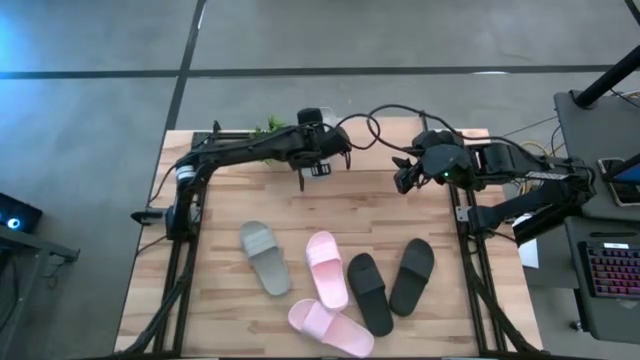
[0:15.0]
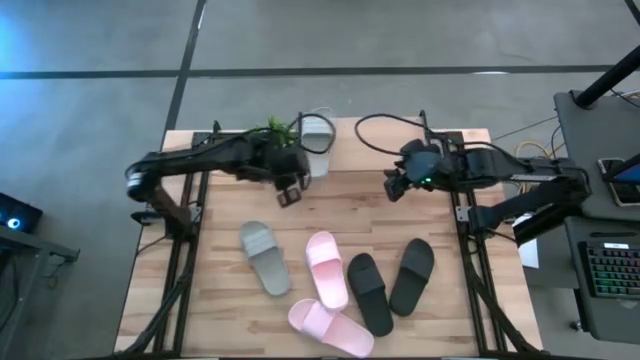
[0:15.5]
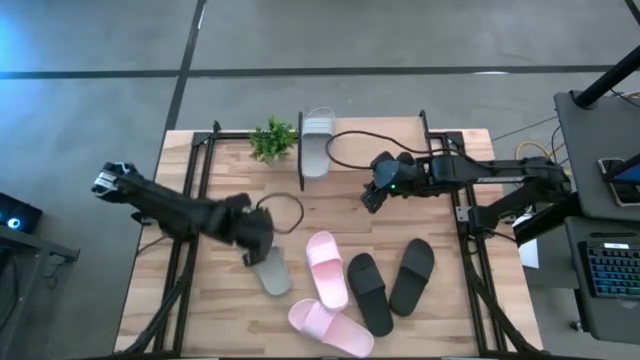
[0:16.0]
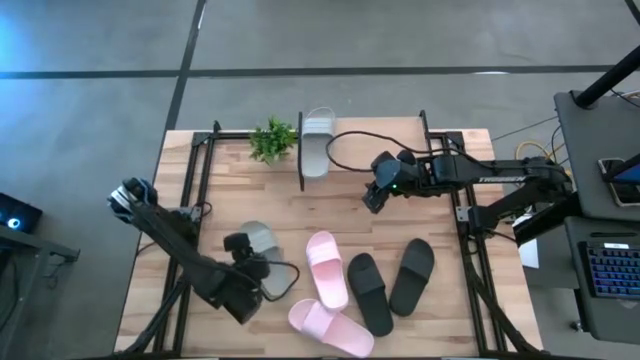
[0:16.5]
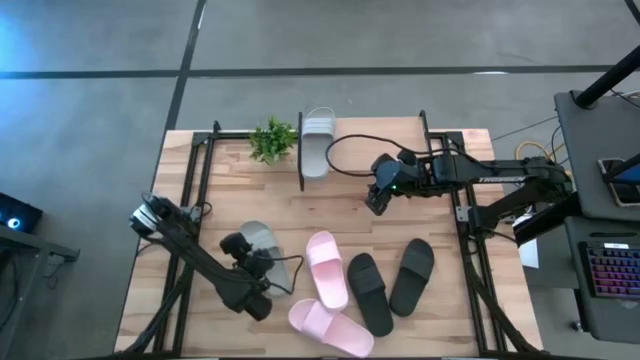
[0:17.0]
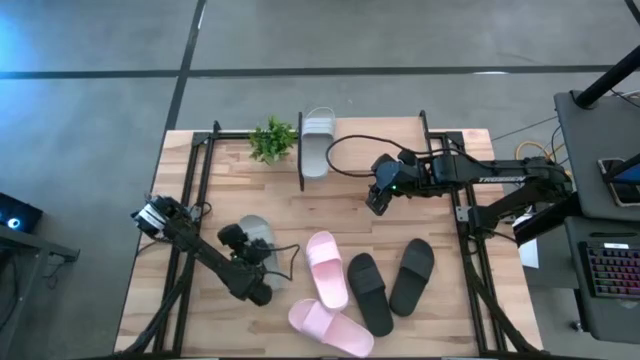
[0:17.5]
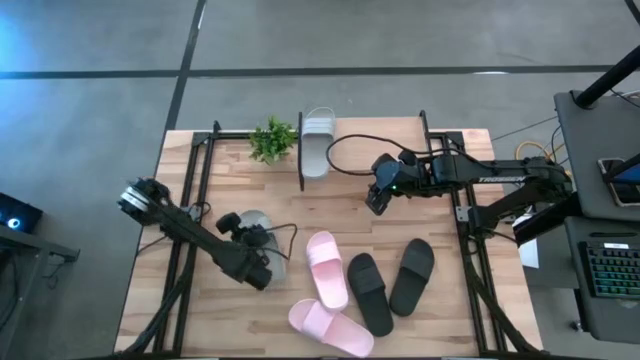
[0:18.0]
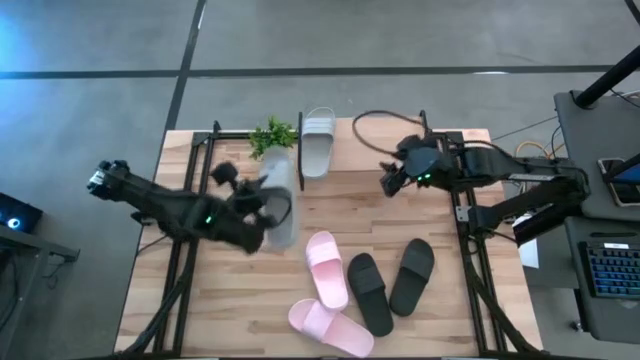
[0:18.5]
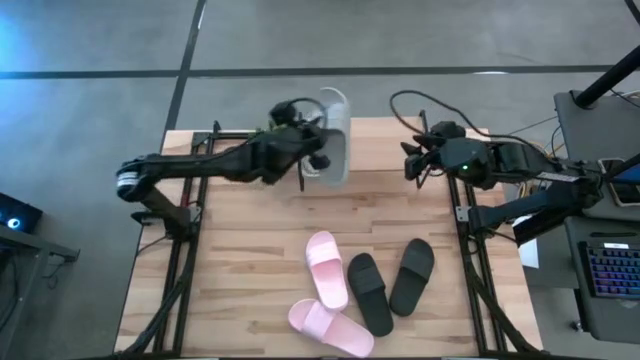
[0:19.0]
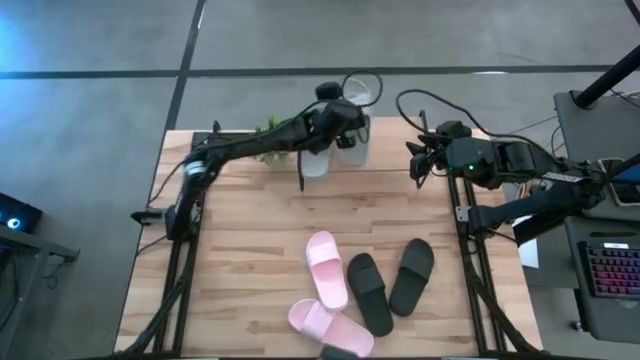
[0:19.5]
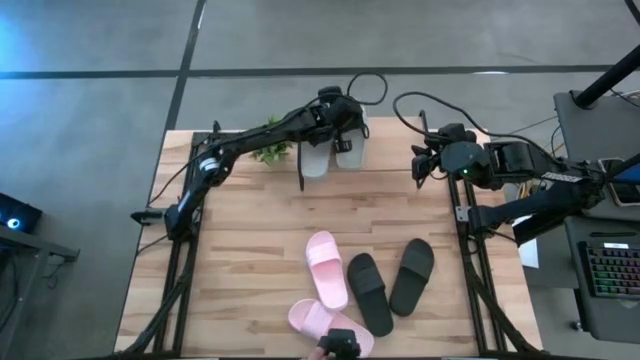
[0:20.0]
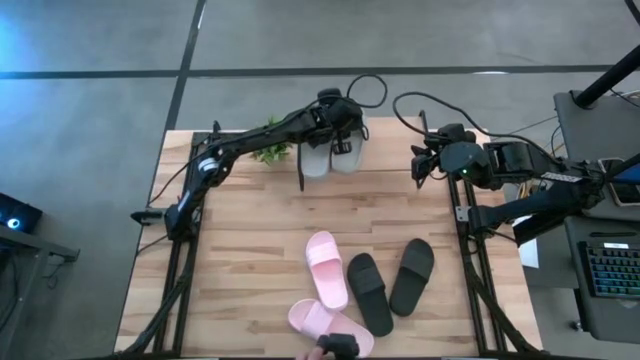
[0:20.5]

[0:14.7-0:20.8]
Task: Pick and place slides into the shelf
Put the gray slides on the shelf

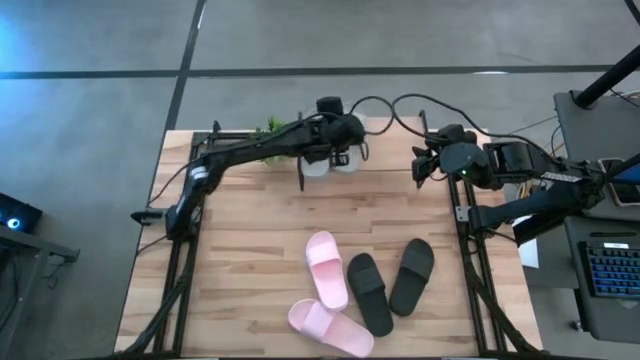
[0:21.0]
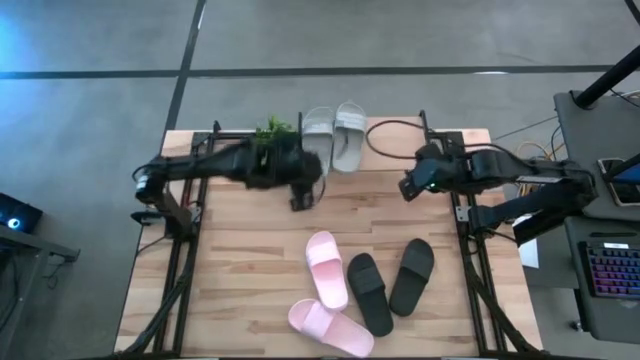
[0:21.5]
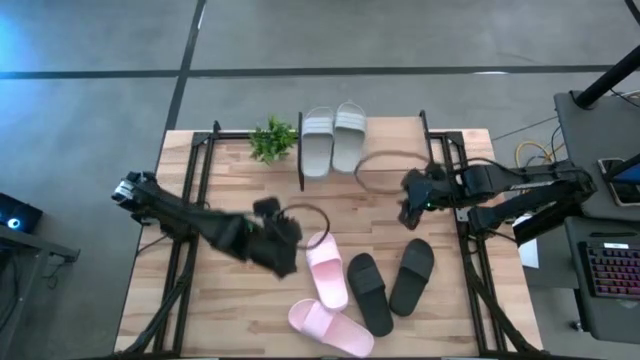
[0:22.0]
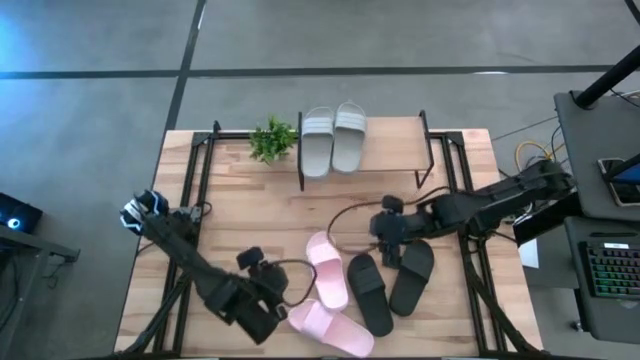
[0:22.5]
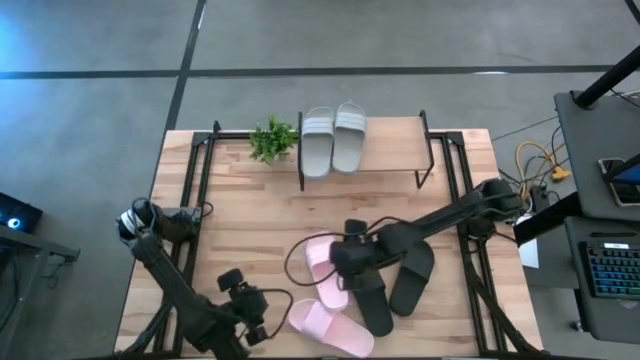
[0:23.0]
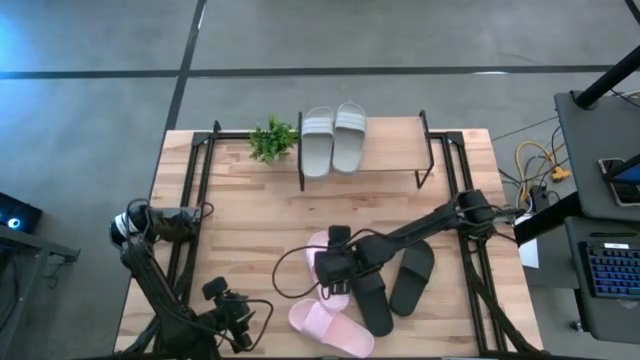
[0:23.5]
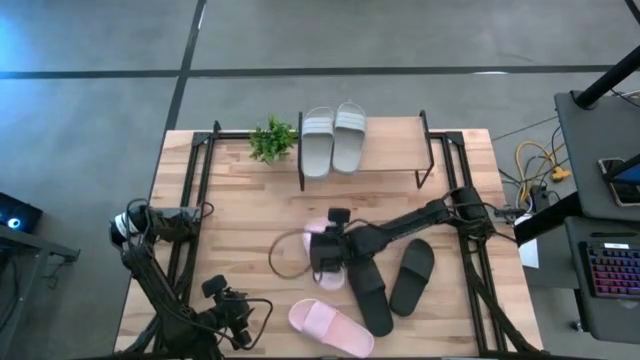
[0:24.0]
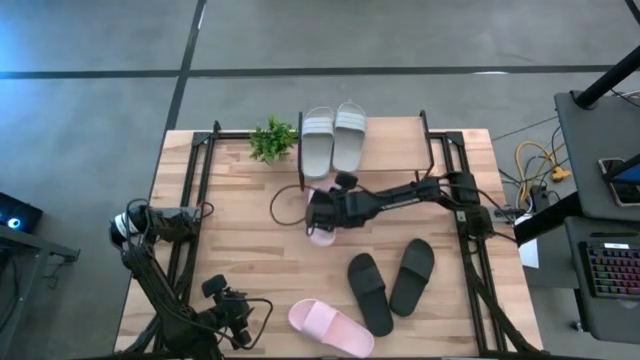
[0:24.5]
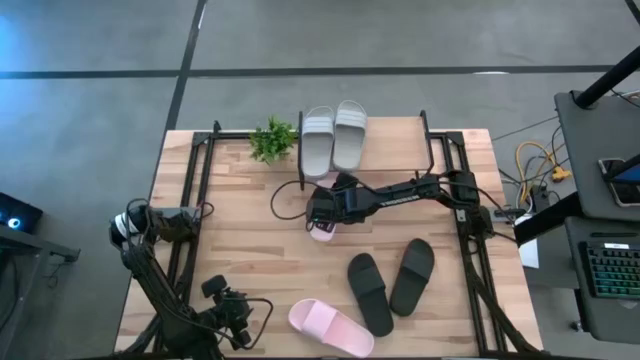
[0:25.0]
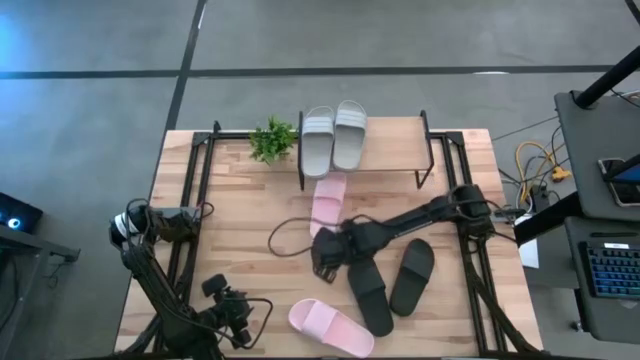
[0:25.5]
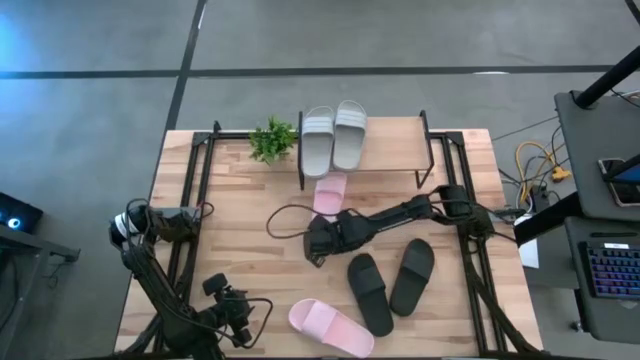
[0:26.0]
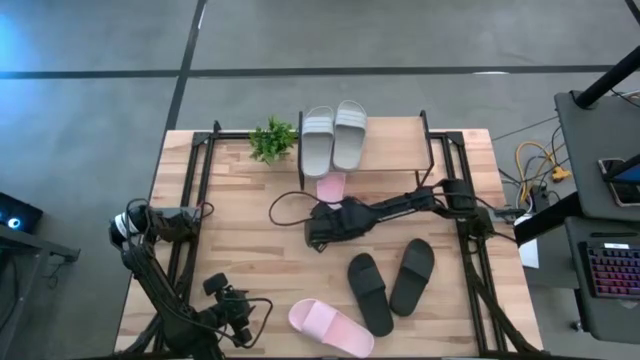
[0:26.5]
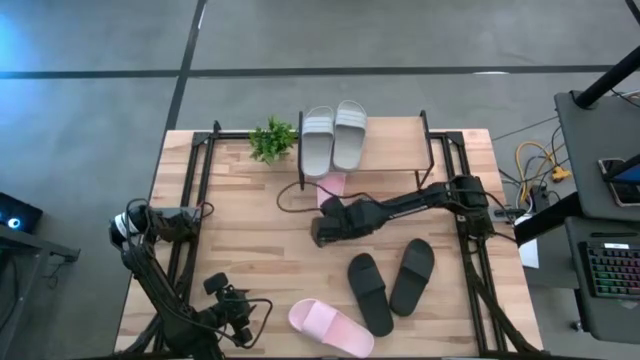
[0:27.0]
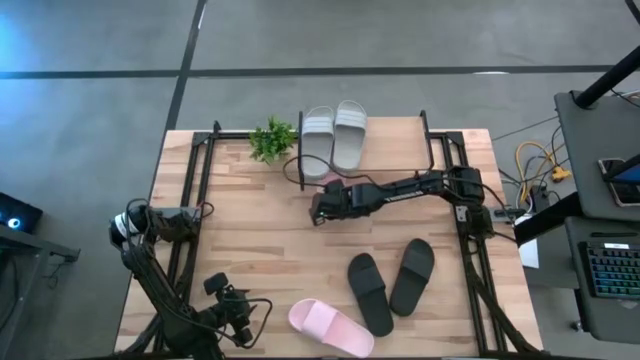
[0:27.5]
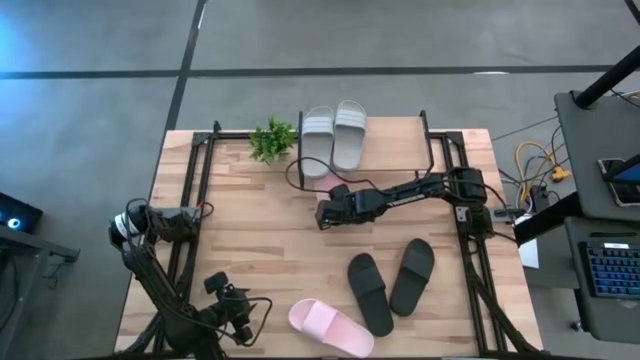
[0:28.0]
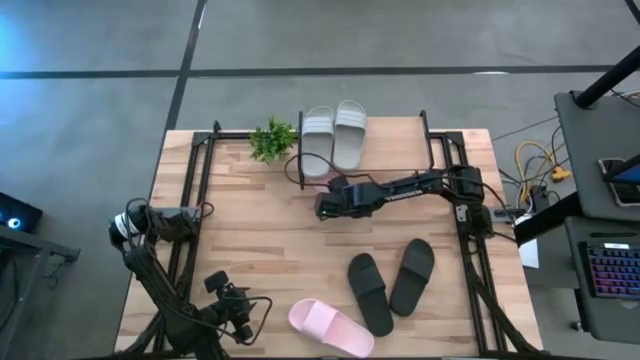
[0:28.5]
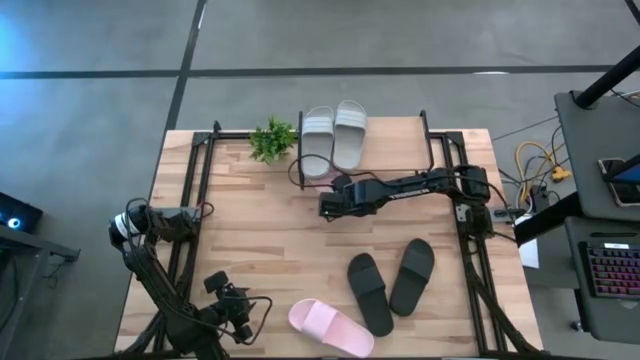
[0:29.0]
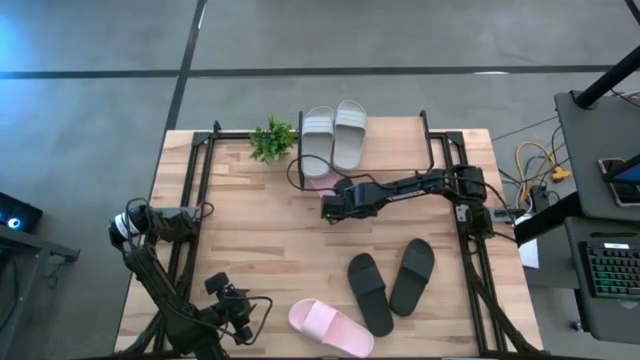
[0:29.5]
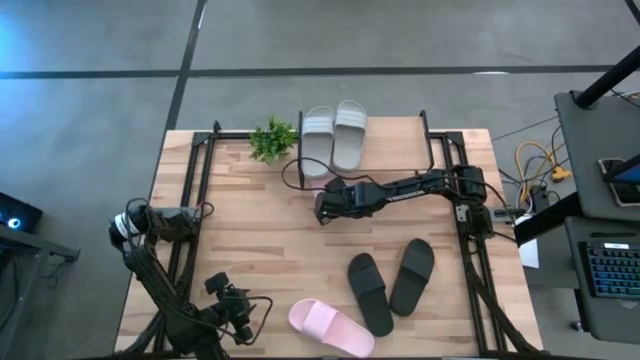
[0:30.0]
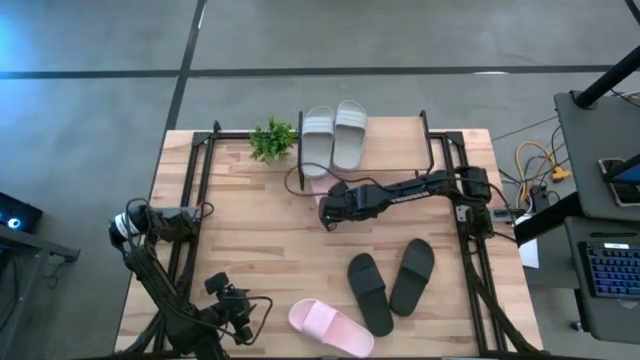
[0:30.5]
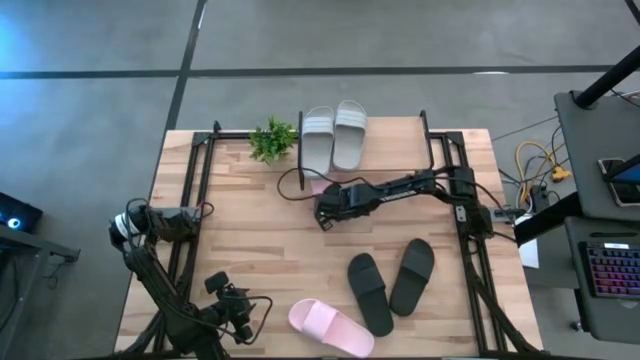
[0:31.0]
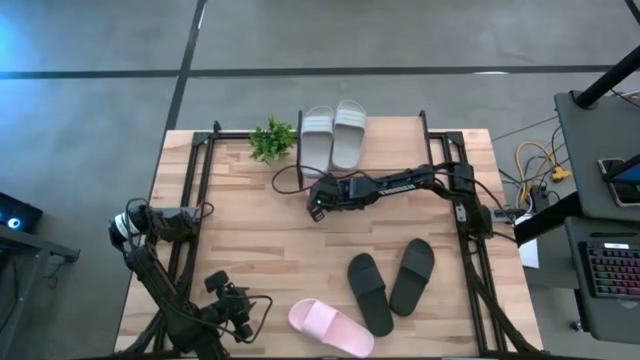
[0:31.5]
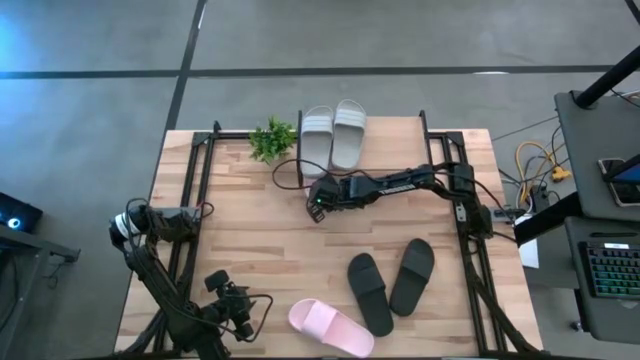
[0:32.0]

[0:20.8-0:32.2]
Move the top pink slides under the shelf
